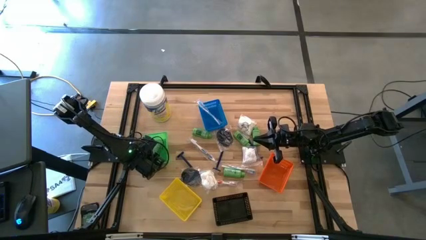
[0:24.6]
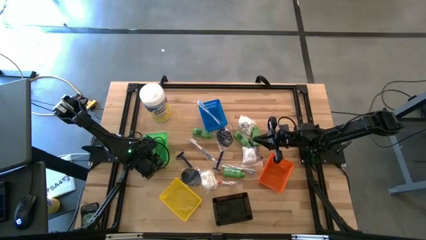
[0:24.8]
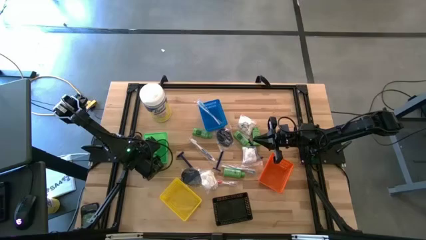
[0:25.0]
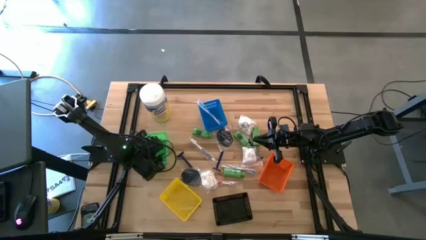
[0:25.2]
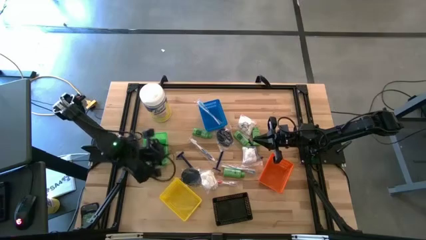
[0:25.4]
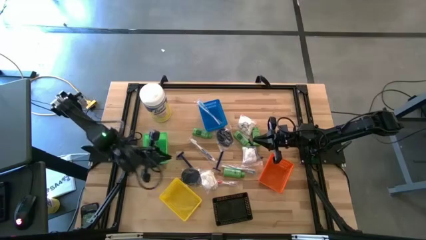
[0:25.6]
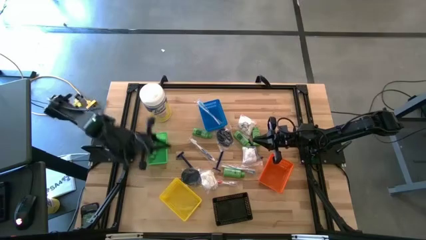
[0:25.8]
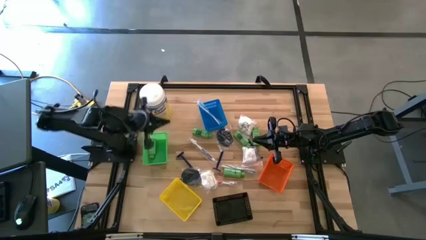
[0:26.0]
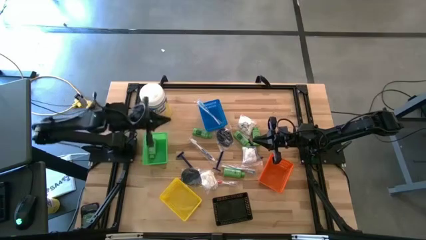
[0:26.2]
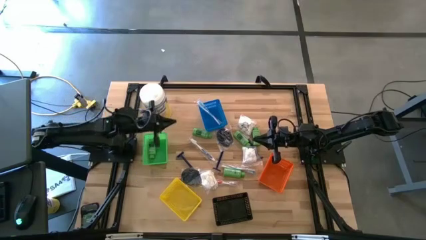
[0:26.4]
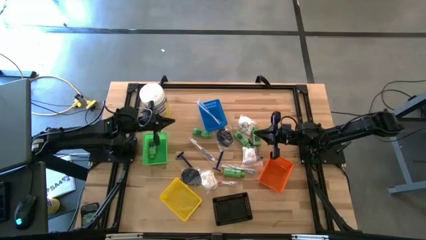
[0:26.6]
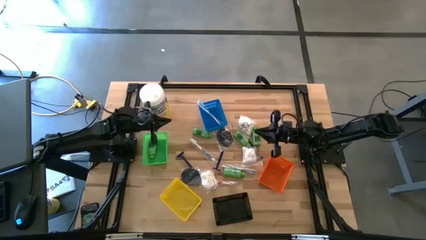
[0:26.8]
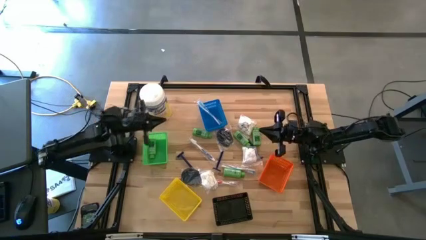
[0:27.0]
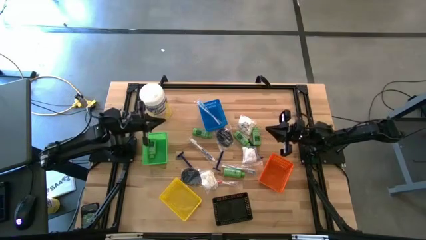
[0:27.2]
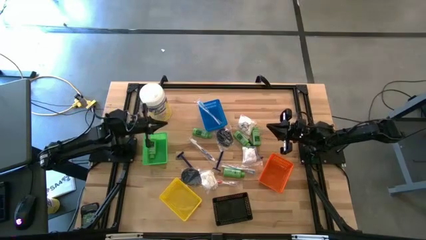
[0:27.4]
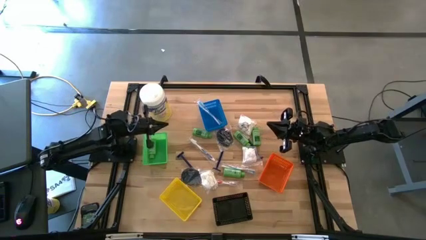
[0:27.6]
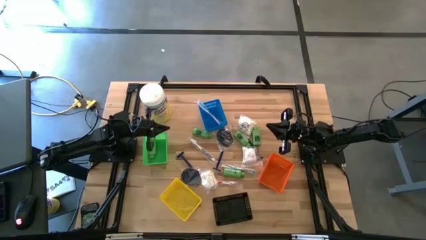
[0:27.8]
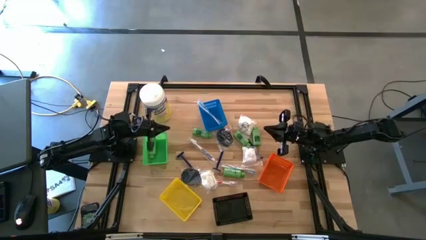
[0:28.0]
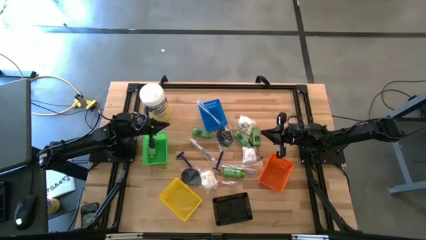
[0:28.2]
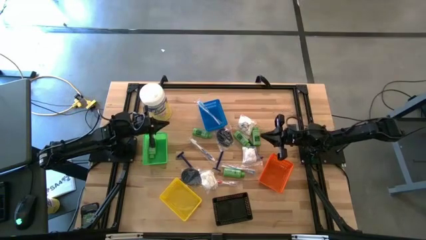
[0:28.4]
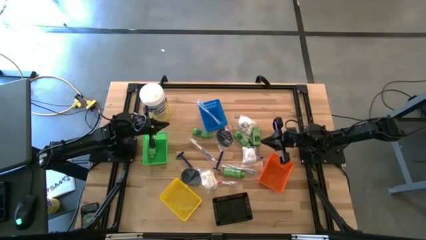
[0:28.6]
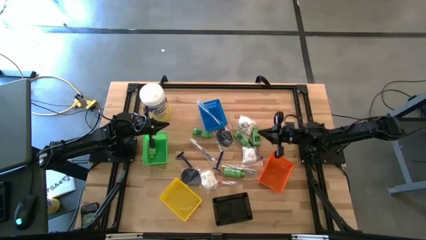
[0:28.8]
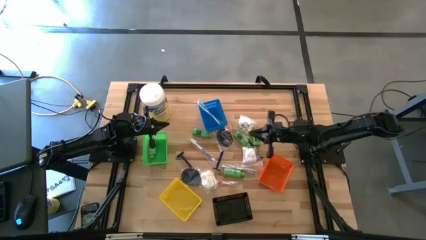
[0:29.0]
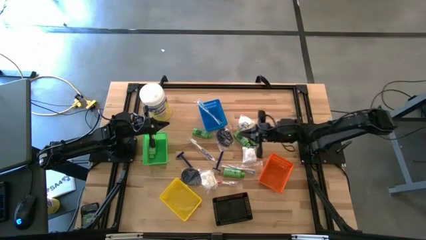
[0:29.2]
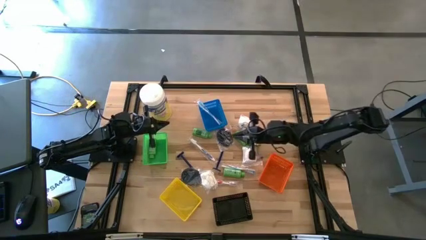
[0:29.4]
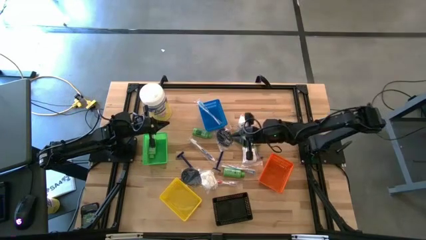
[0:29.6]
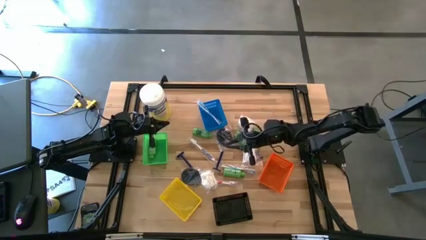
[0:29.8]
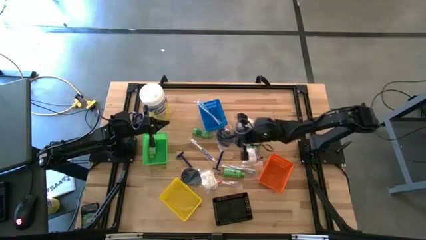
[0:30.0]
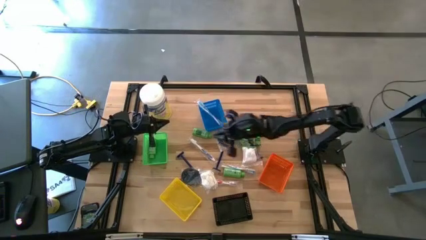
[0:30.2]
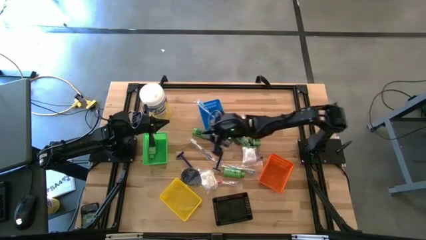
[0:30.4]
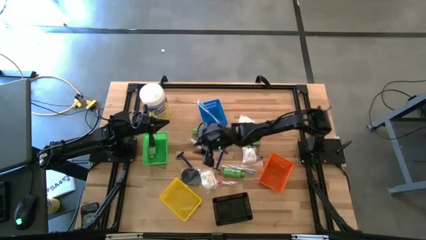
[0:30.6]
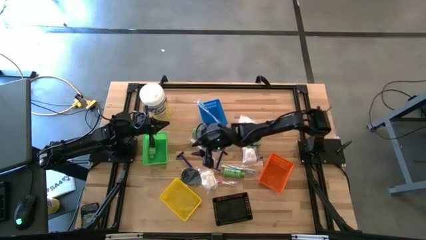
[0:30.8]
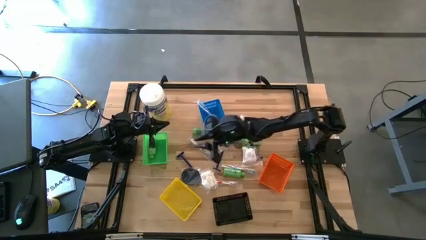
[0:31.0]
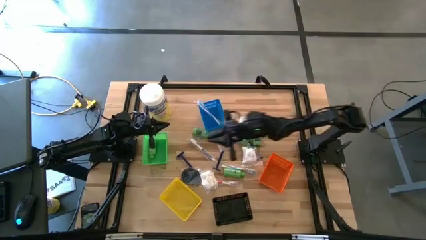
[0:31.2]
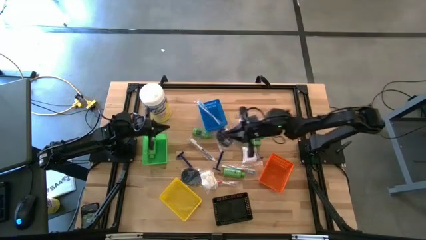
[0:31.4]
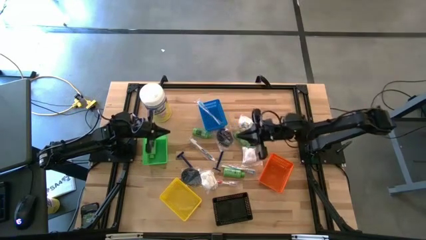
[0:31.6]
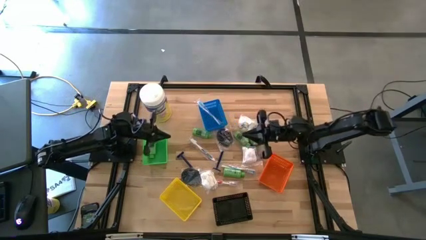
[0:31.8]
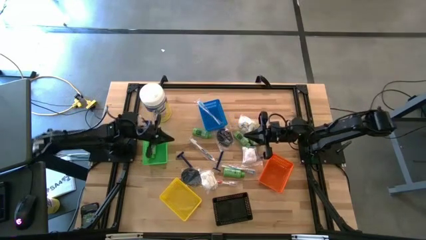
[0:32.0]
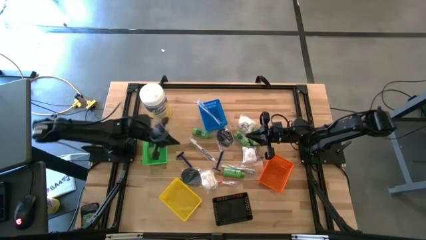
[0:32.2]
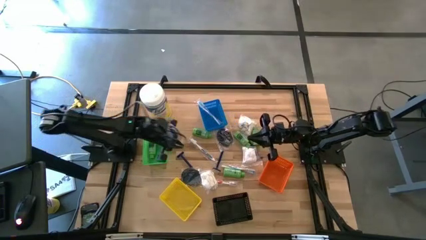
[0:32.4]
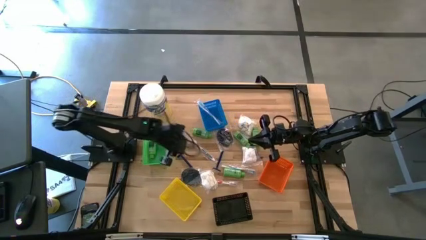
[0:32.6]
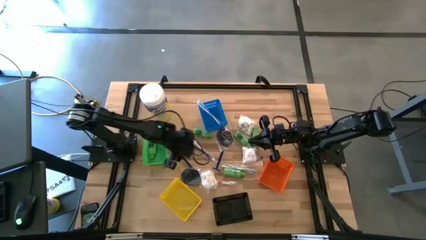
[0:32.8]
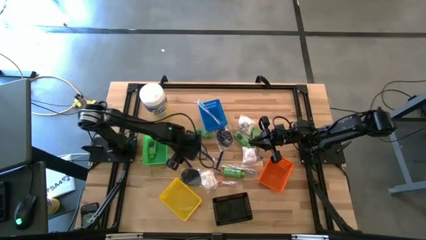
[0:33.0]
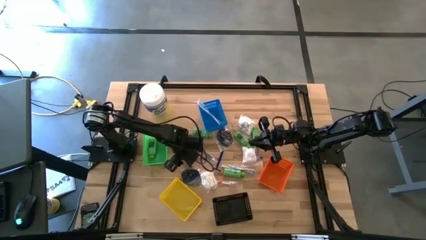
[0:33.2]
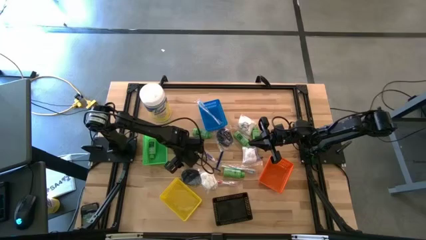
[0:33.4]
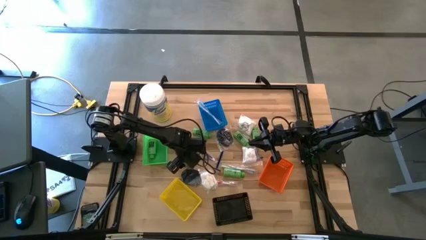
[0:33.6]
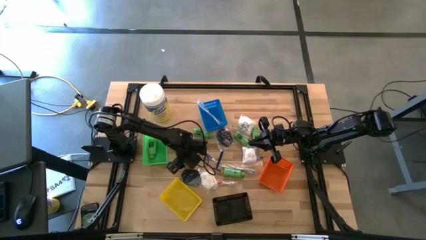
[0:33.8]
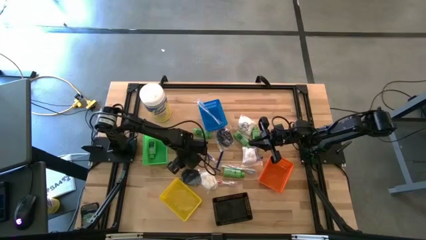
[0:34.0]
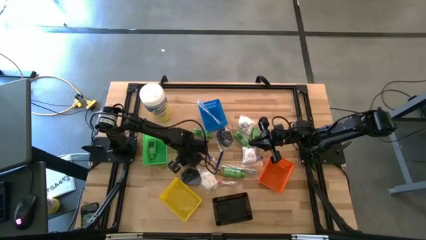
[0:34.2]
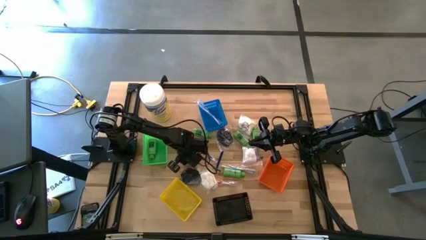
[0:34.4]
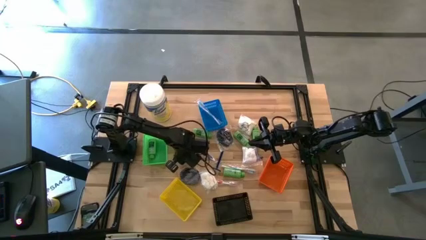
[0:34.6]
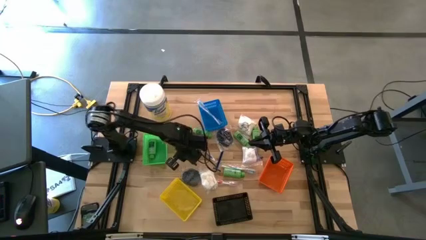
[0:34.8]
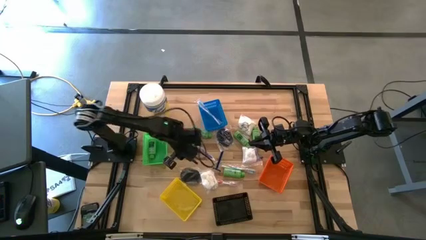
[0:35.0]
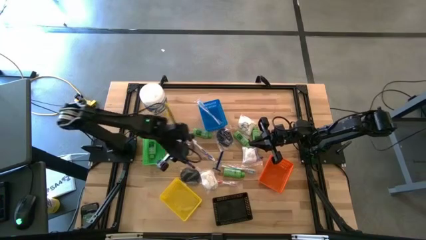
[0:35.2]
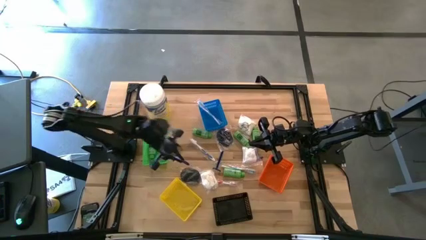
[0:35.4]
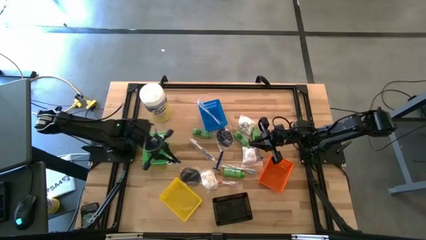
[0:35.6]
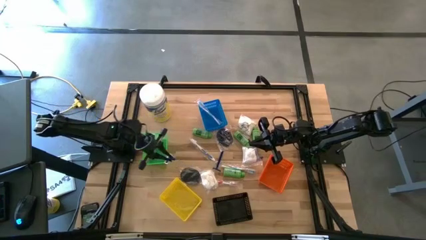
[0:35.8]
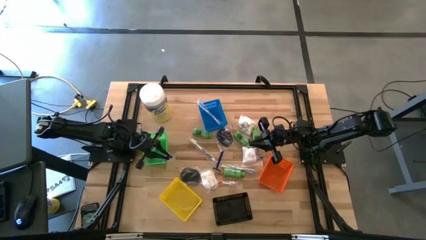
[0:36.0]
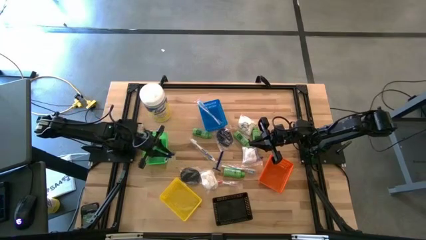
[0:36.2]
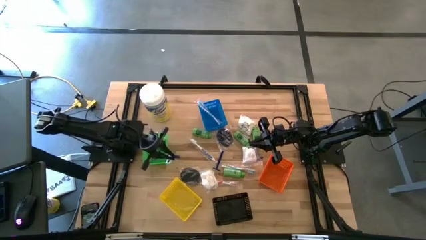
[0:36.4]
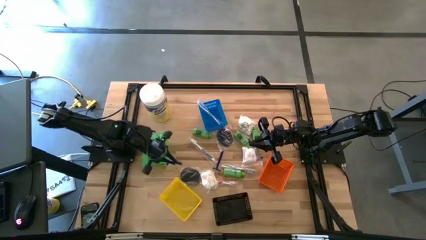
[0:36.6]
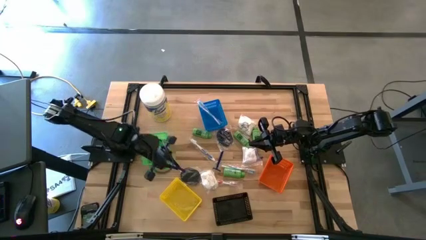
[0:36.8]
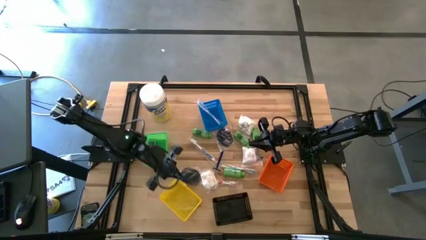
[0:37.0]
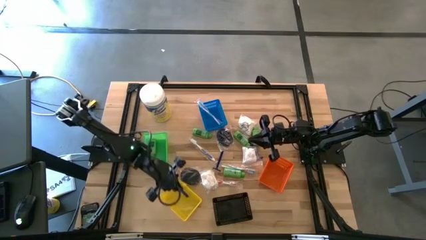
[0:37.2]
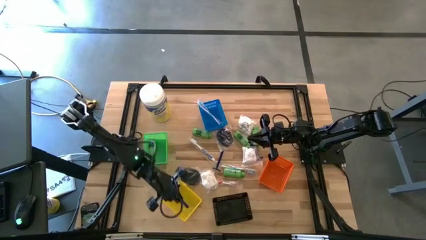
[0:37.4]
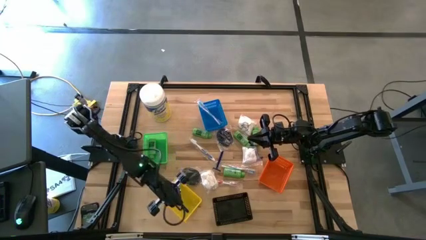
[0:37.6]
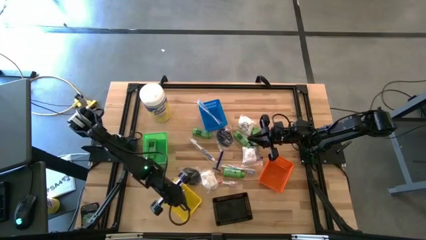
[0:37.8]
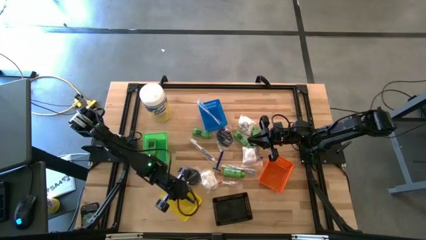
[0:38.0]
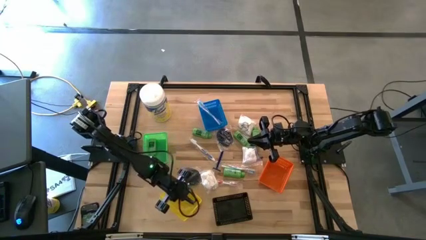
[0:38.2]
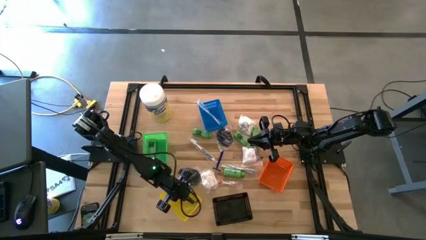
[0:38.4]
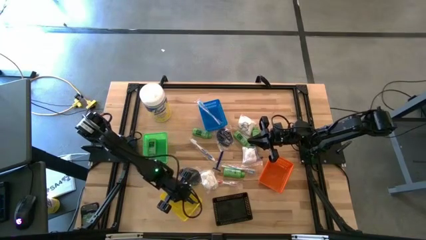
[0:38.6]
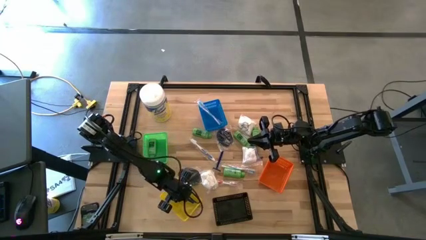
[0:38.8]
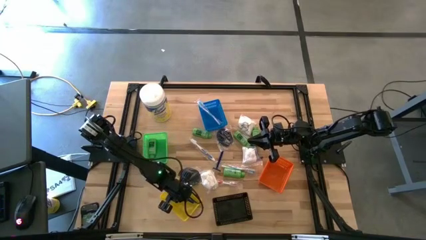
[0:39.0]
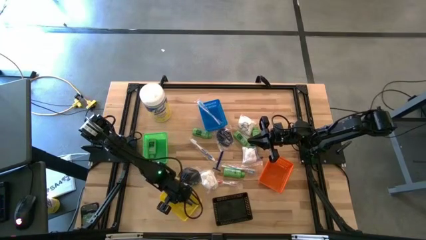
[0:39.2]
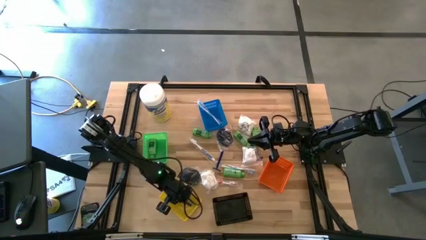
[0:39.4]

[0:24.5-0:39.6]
Task: Pick & Place Travel size toiletries
Put the blue razor into the yellow bin
